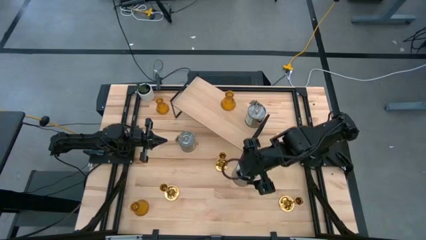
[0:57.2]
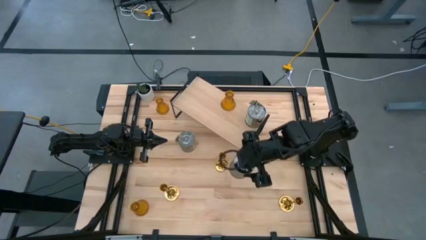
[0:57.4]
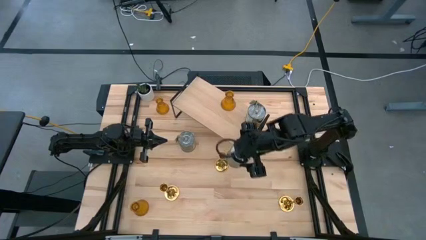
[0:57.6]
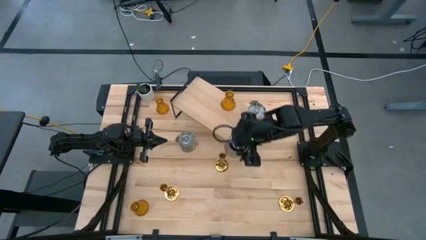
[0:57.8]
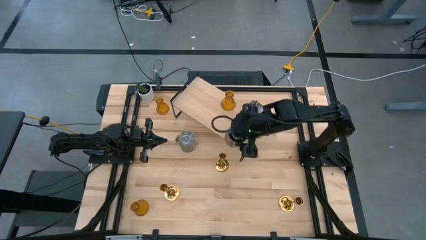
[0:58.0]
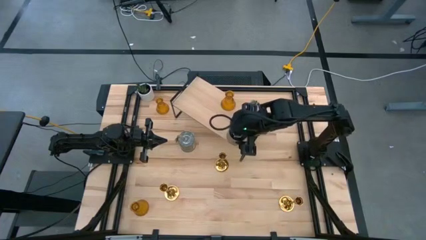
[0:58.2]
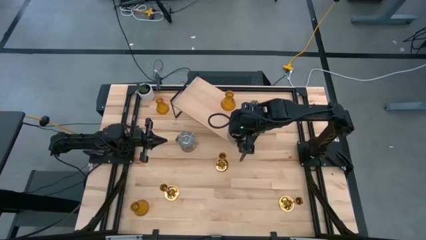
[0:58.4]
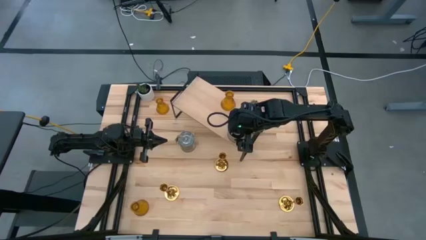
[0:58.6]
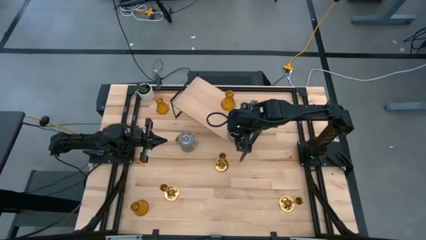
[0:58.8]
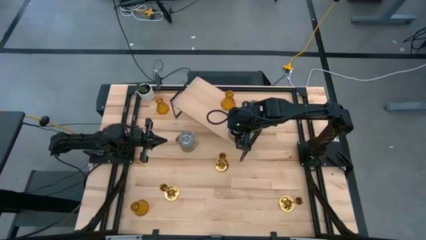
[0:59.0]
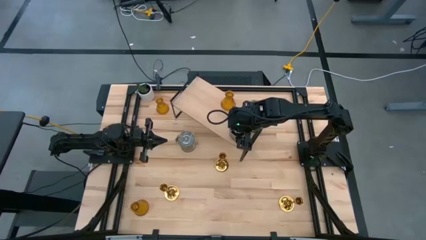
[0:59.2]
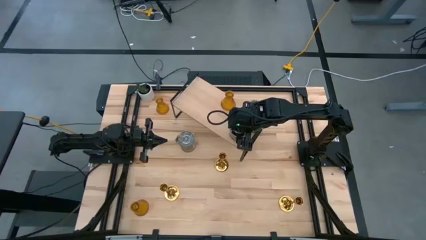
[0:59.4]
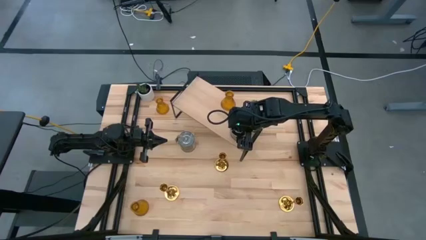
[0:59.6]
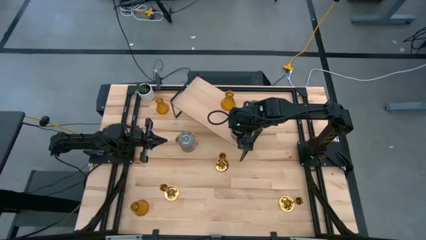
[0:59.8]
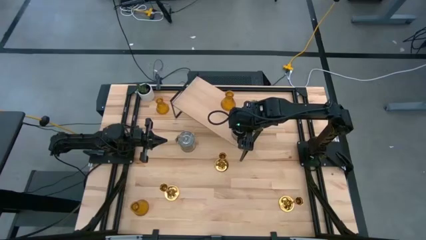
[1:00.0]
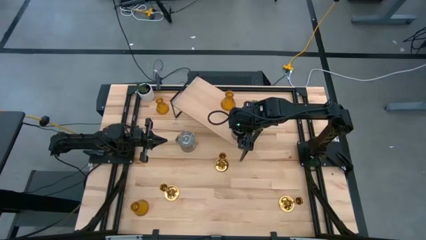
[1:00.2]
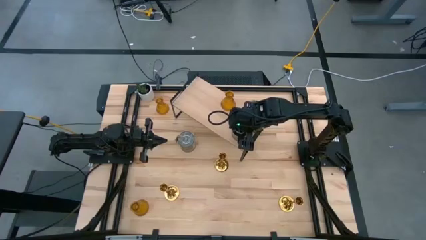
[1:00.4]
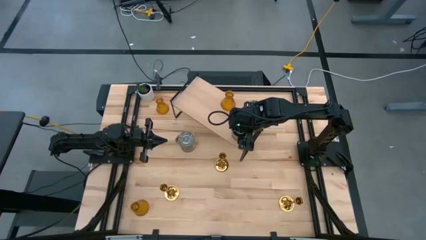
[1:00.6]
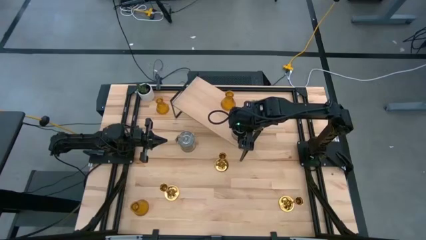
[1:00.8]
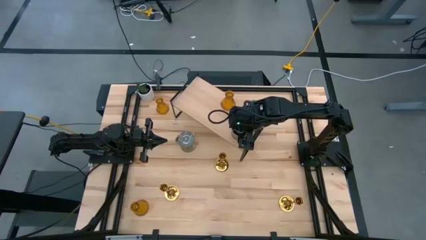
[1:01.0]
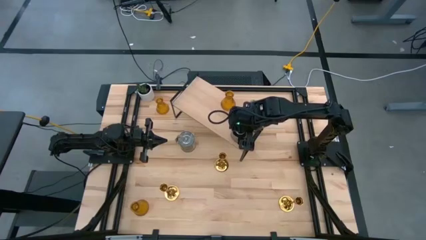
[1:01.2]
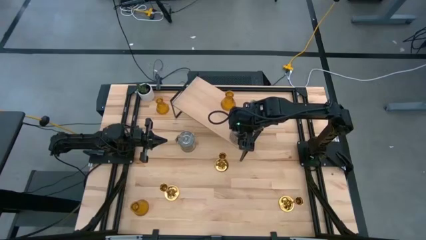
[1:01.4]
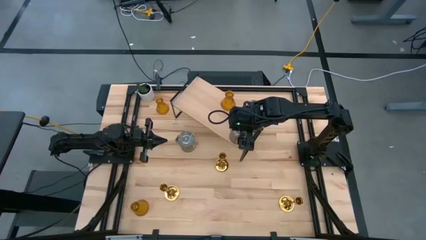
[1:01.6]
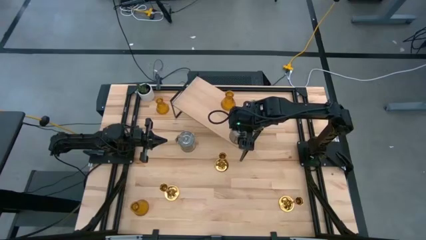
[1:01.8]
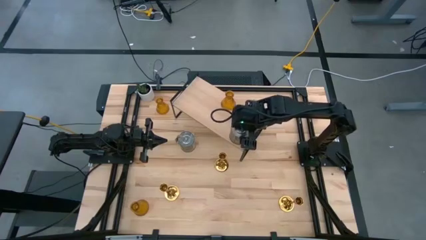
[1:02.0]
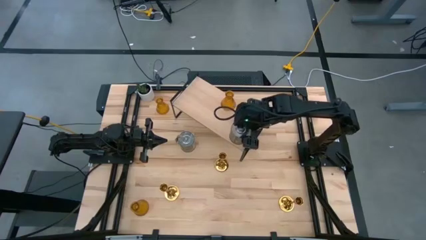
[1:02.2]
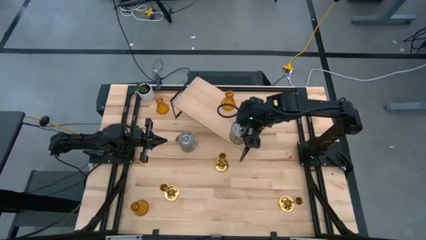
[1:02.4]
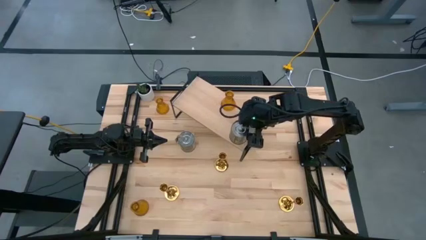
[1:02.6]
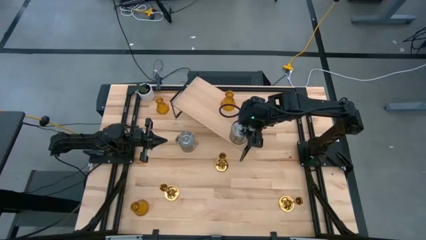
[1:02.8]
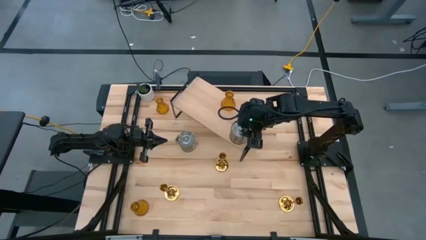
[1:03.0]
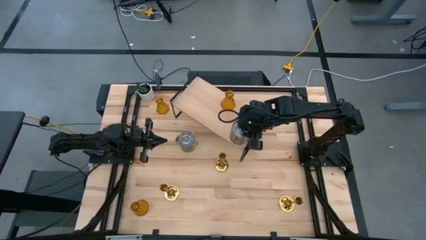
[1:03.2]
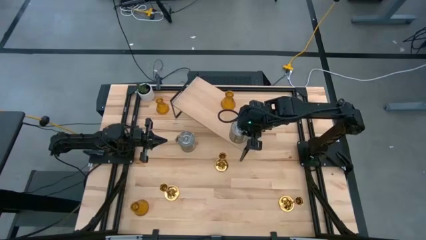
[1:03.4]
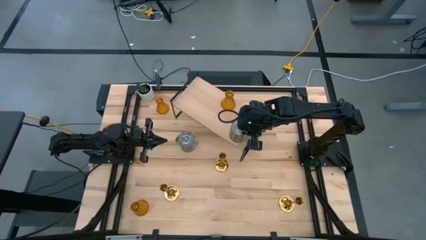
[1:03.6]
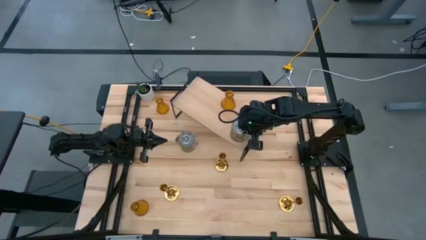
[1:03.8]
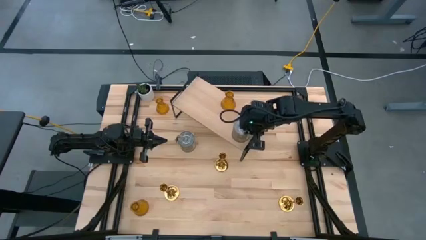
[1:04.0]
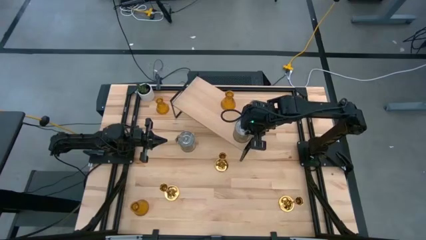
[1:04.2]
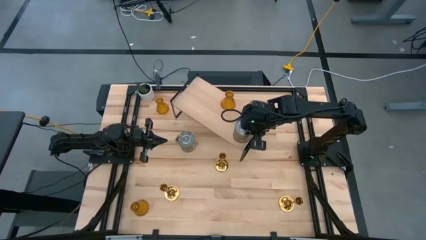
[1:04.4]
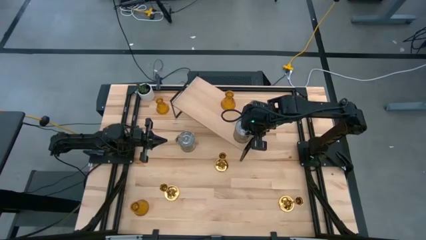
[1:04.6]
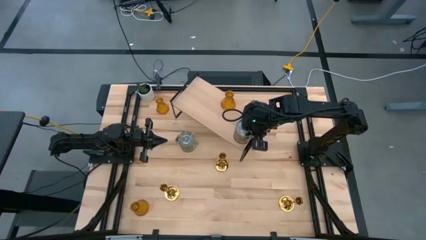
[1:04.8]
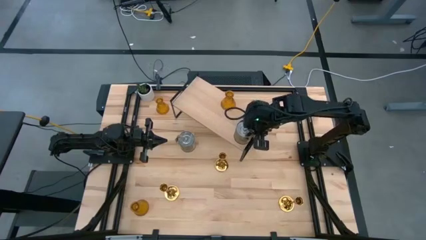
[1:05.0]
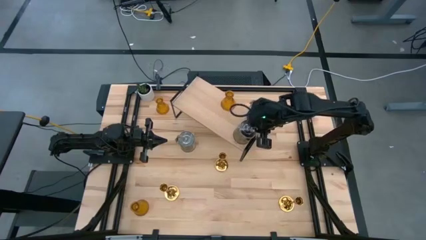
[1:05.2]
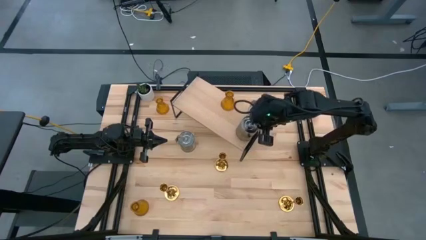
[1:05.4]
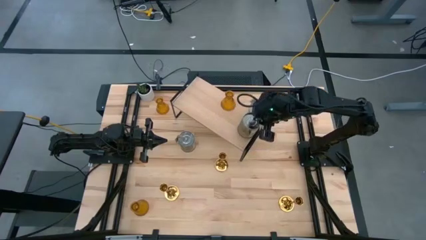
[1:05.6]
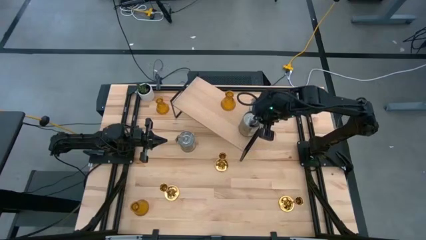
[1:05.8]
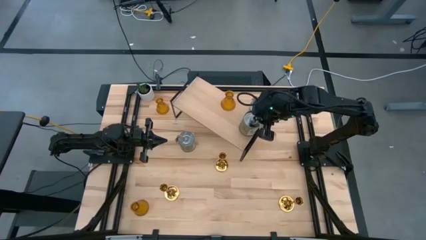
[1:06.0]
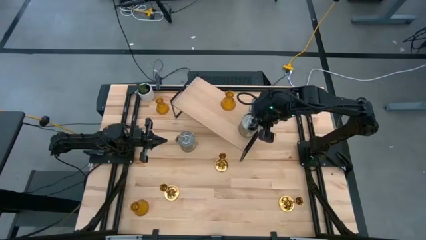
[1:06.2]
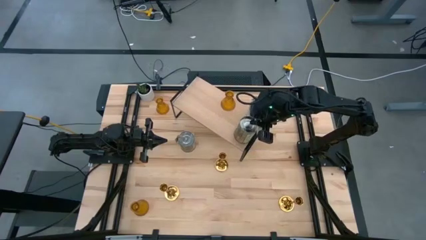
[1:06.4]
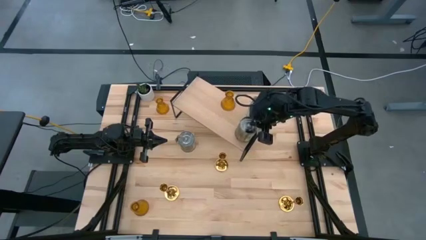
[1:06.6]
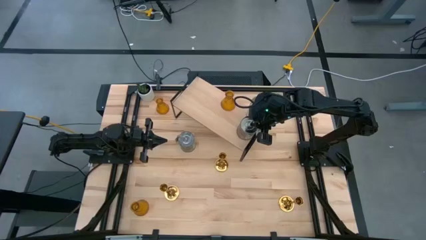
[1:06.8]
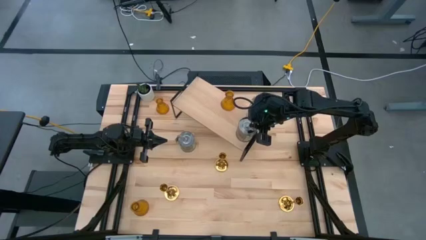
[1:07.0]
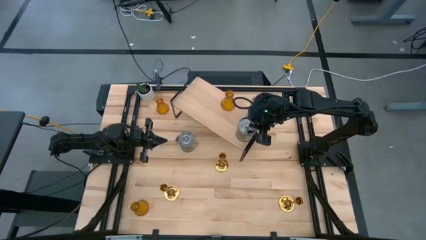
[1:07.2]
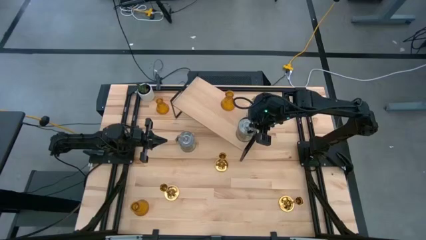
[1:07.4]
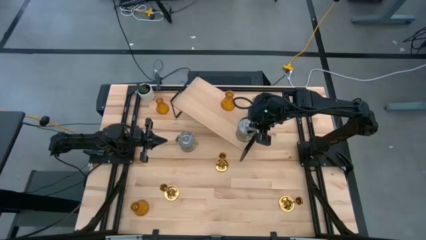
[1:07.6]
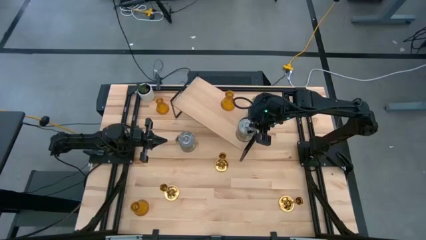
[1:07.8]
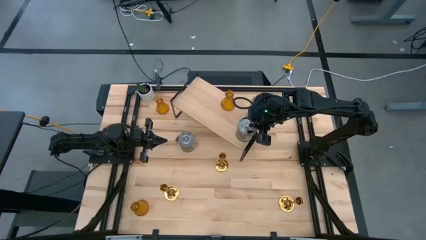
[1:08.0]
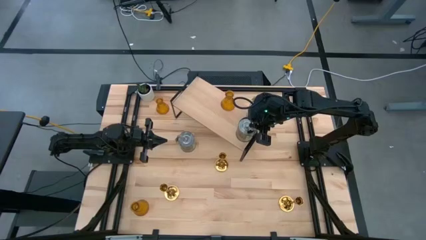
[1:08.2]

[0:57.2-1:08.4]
Task: Pick & Place candle stick holders
Put the bottom scented candle on the shelf aligned with the other scented candle

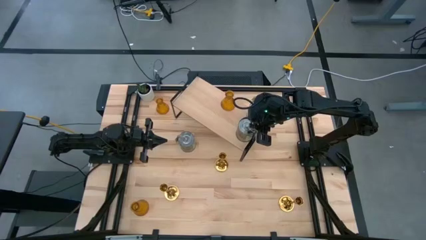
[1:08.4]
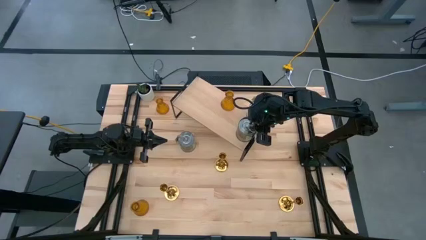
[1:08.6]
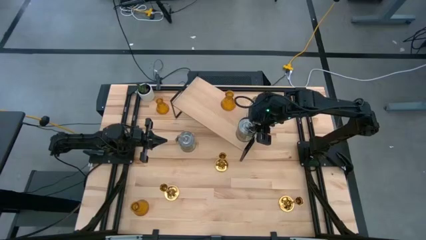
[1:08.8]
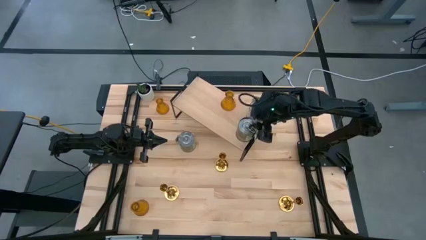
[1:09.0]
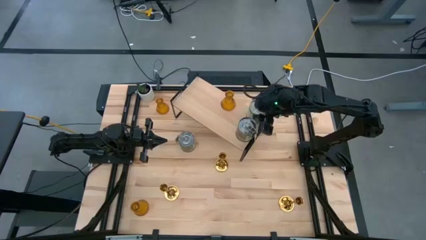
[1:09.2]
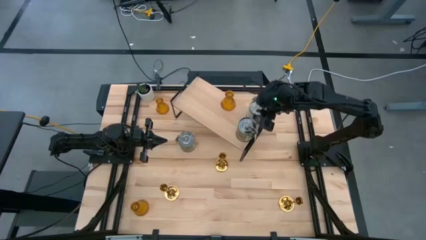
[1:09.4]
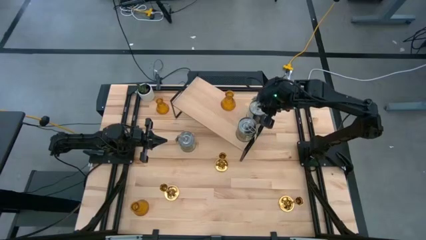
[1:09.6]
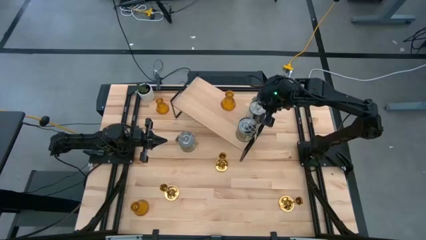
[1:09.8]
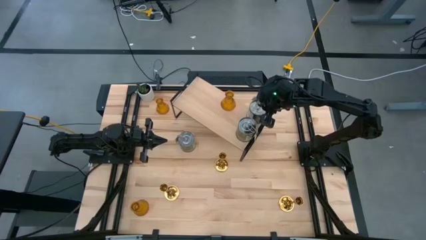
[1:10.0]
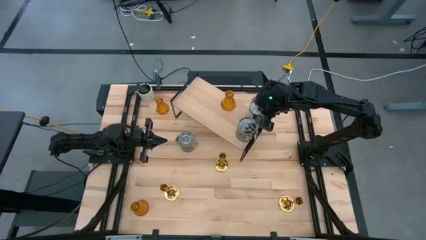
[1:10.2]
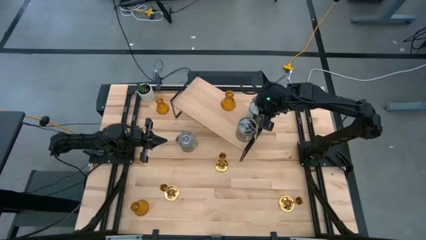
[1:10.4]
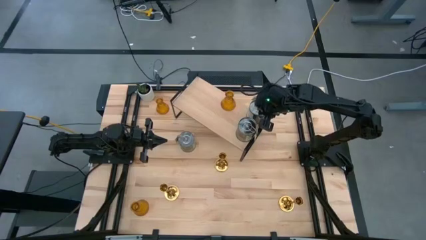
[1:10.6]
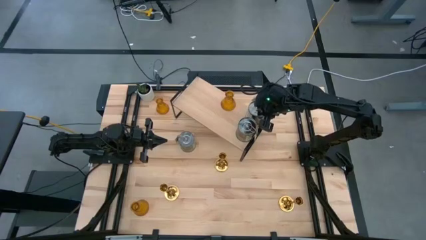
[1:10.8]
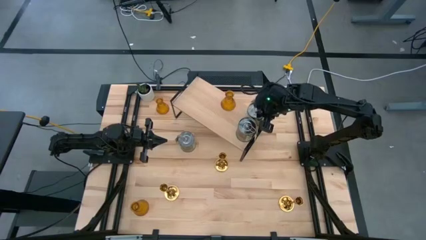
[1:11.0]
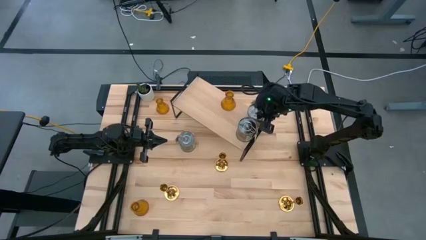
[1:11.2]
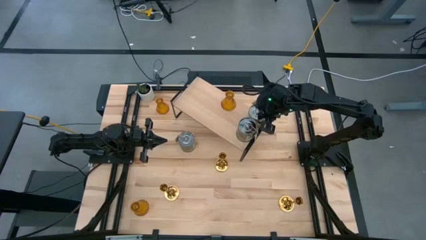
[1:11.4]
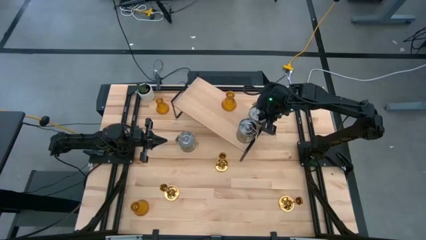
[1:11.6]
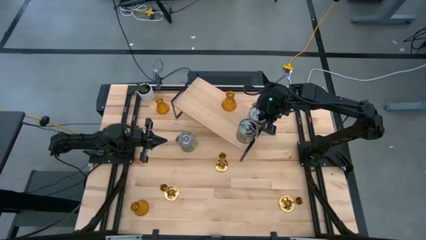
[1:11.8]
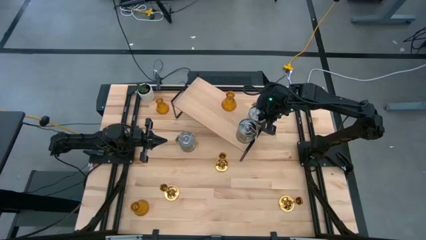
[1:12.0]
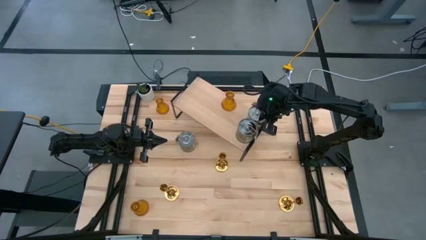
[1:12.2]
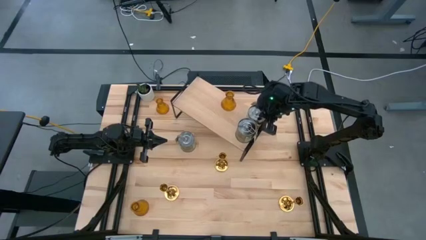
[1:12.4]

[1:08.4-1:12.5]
Adjust the scented candle on the shelf
